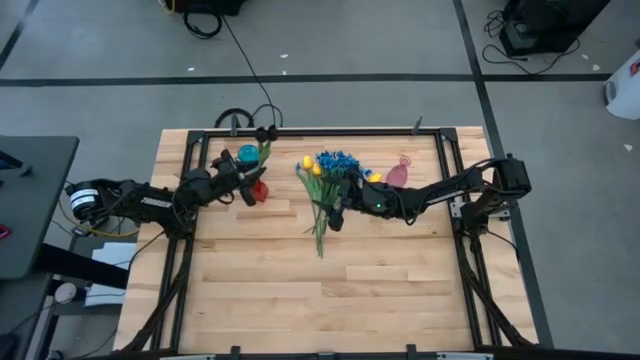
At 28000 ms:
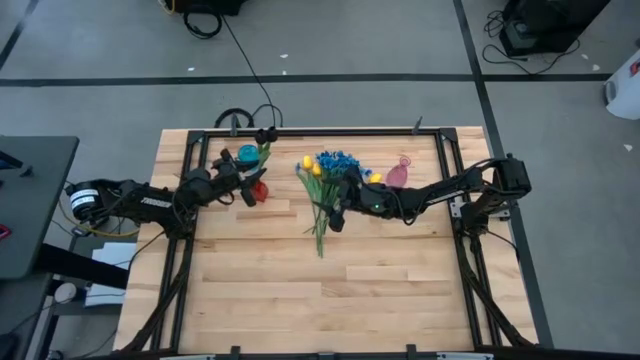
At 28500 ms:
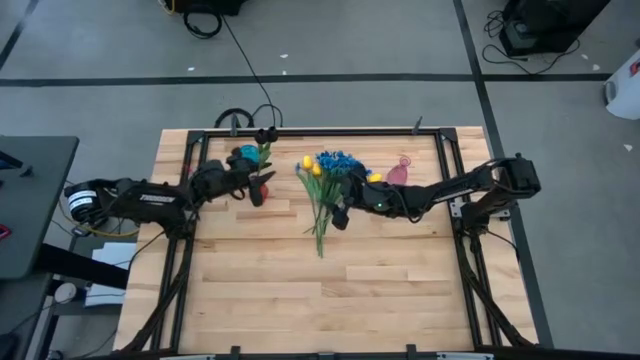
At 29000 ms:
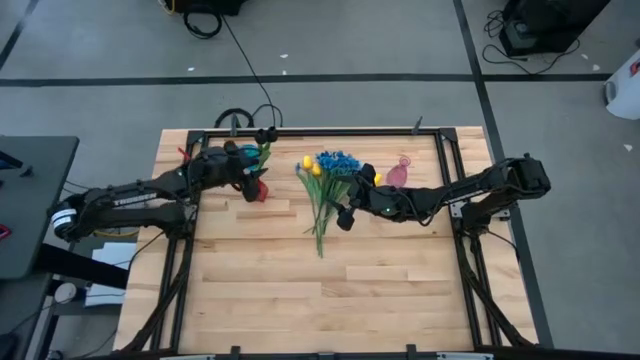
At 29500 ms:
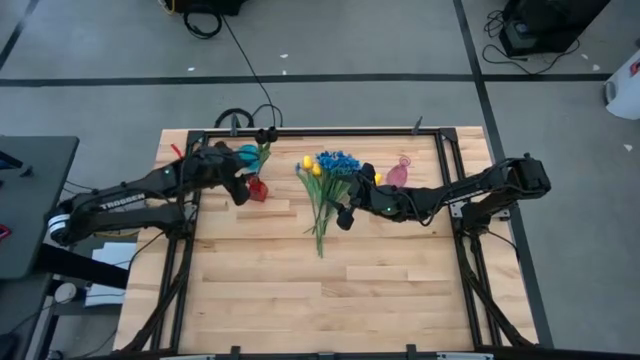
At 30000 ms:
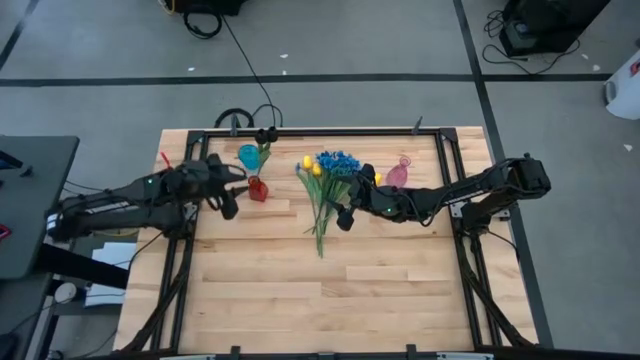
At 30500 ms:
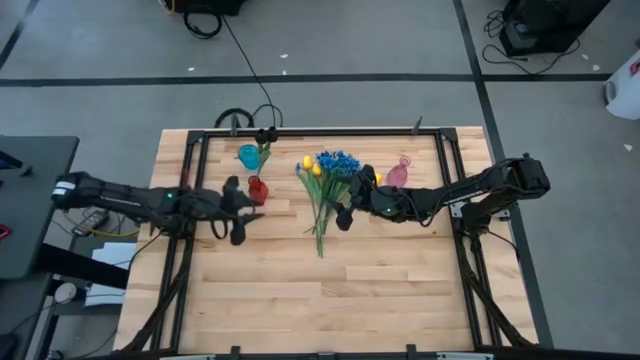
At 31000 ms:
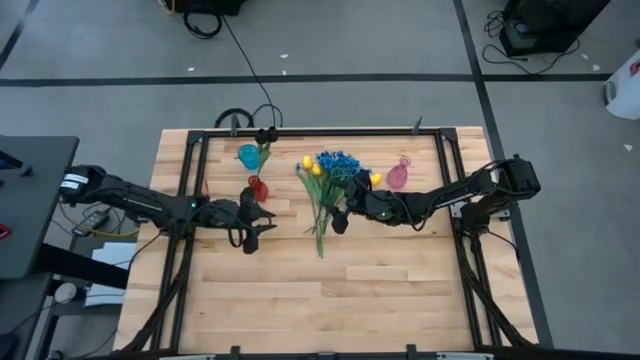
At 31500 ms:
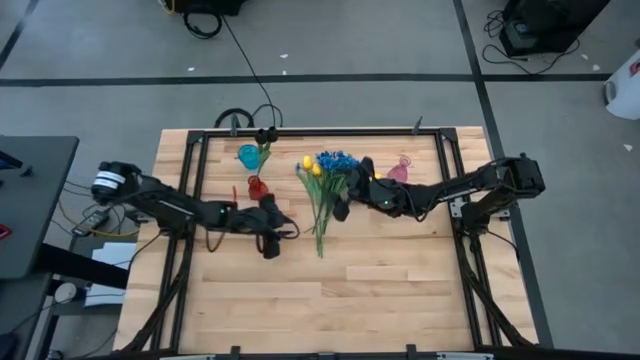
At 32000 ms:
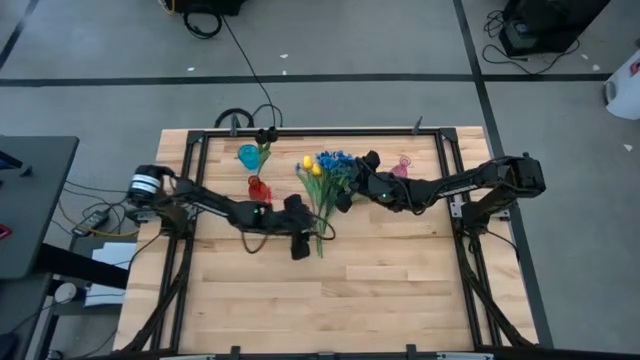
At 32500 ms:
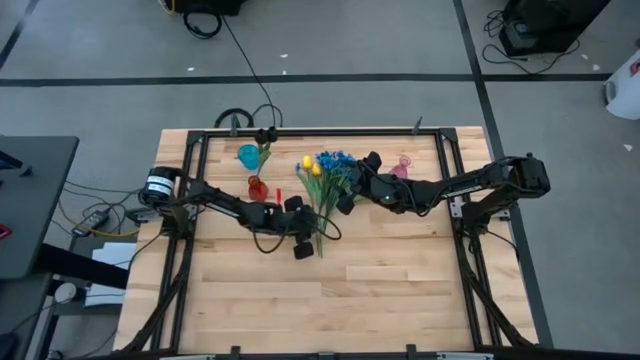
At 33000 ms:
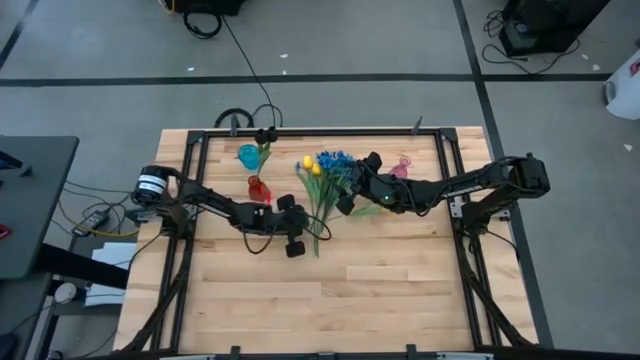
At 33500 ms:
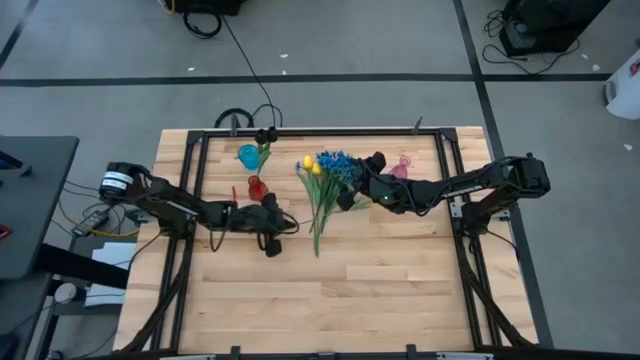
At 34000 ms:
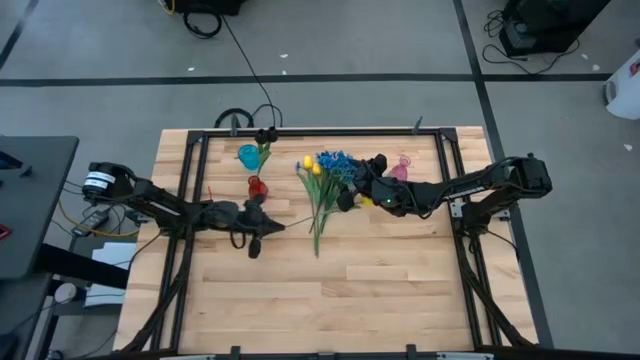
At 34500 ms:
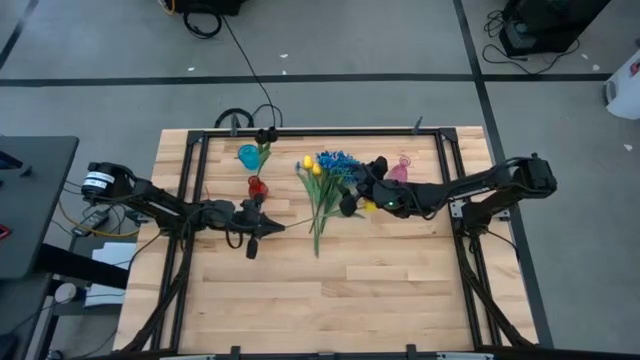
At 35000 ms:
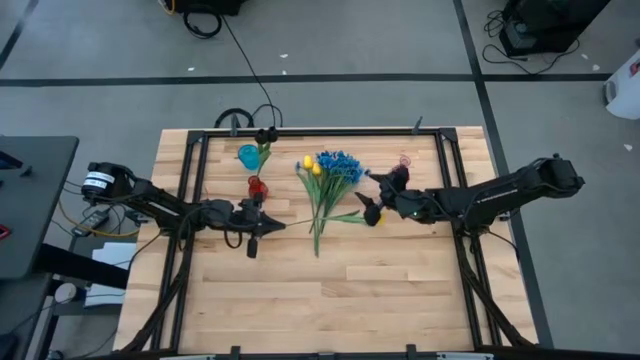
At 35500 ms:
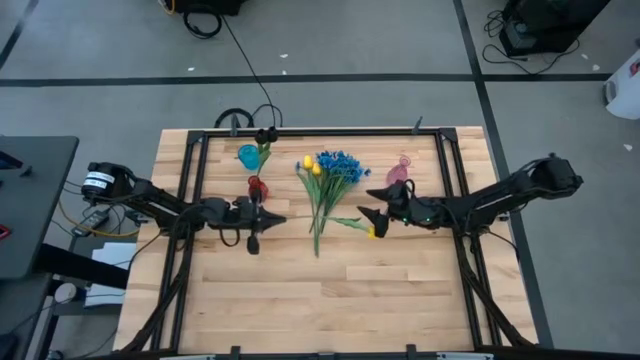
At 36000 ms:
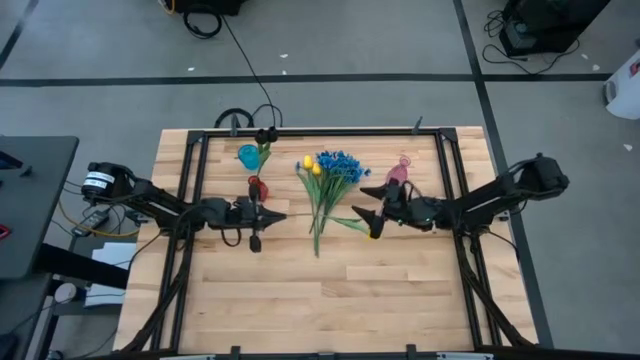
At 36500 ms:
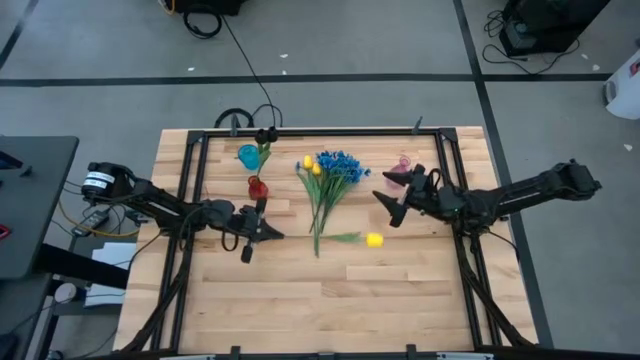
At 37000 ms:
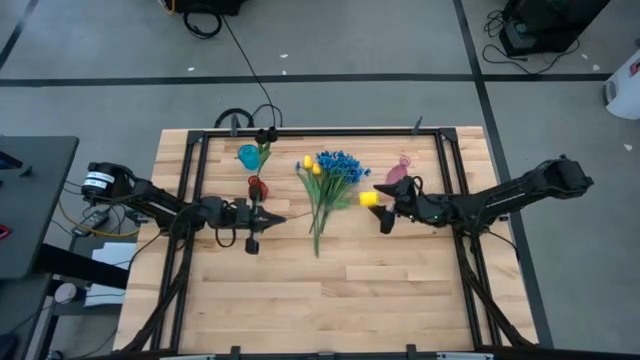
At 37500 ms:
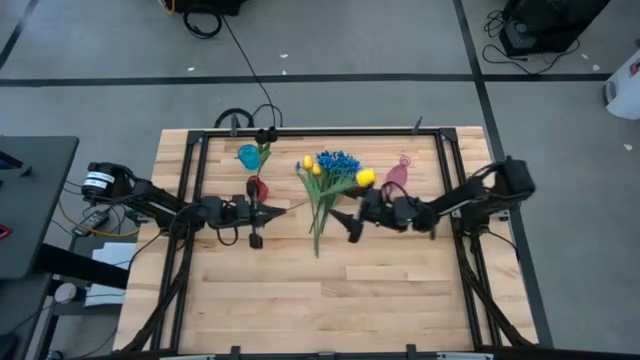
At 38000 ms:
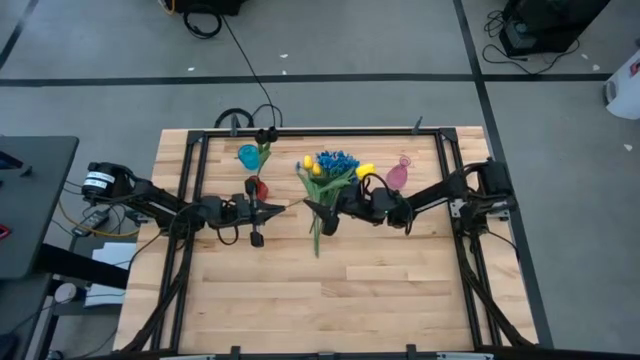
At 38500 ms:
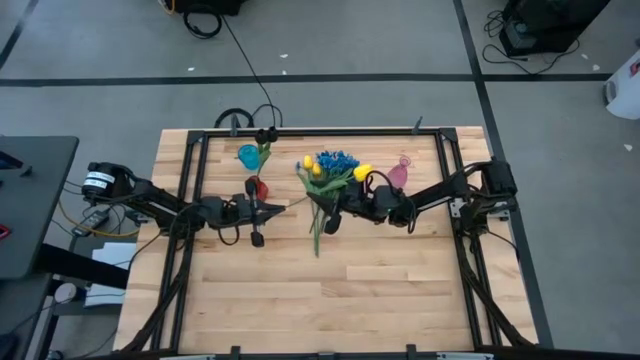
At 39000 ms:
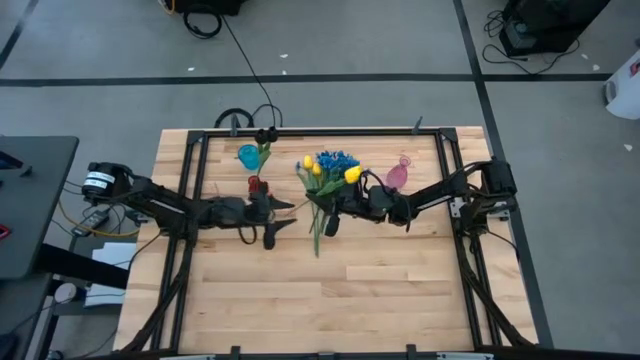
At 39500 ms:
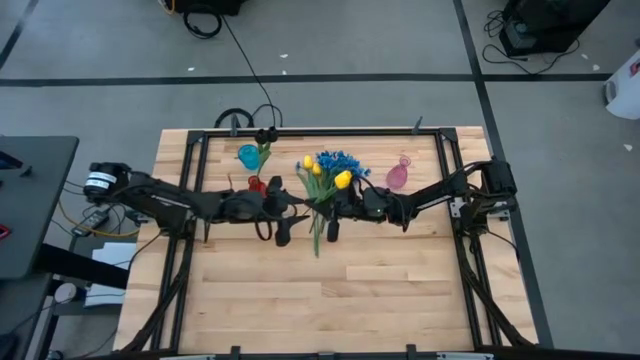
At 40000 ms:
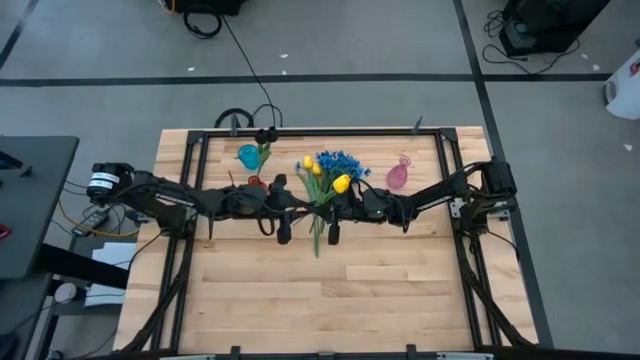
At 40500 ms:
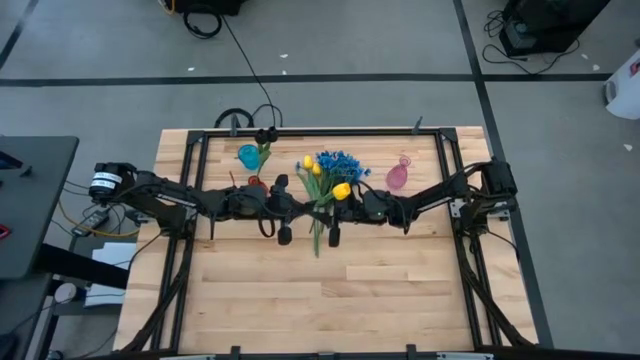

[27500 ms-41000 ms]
Task: Sort flowers into vase by color
Put the yellow flower into the pink vase

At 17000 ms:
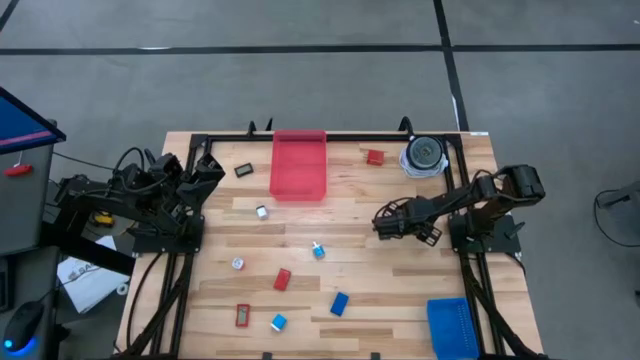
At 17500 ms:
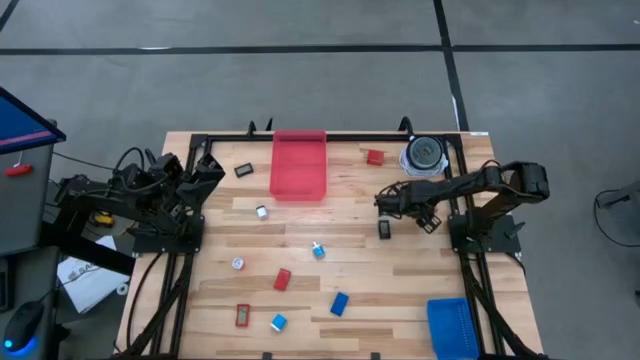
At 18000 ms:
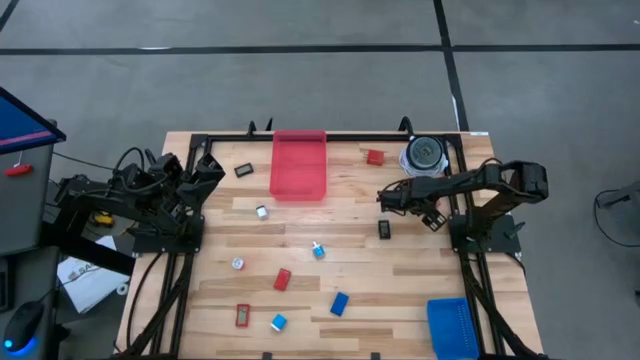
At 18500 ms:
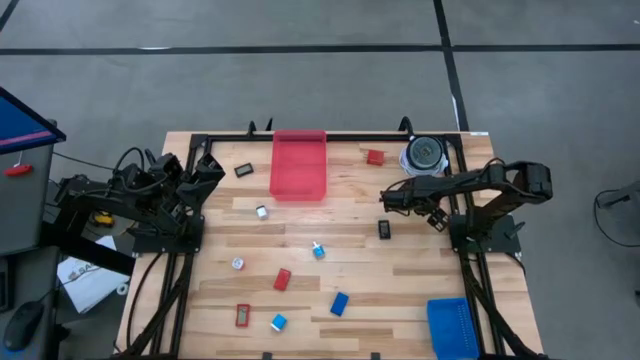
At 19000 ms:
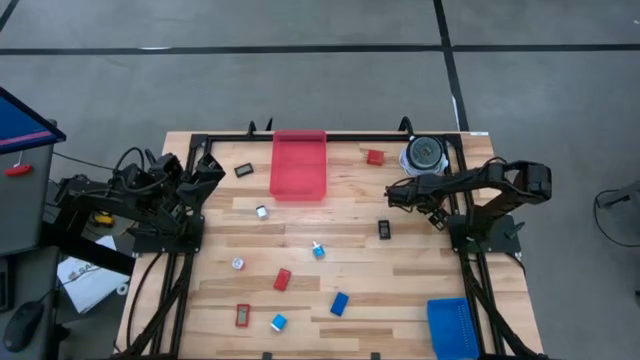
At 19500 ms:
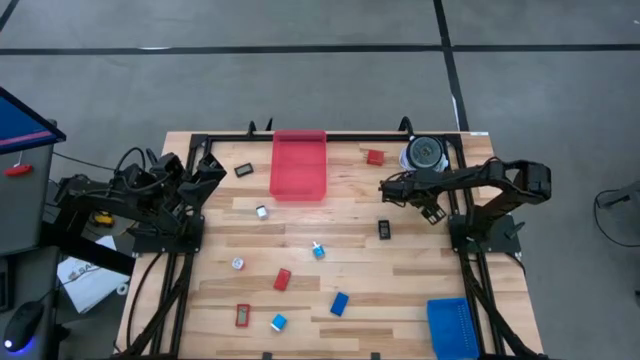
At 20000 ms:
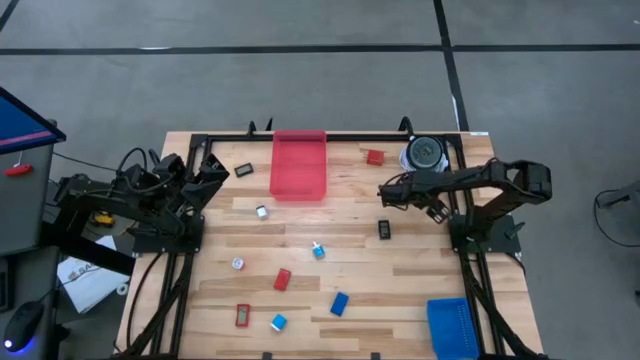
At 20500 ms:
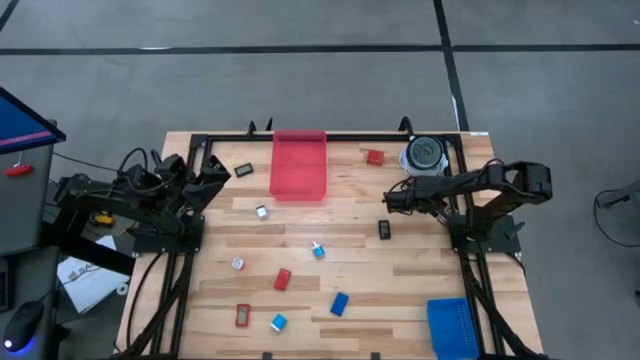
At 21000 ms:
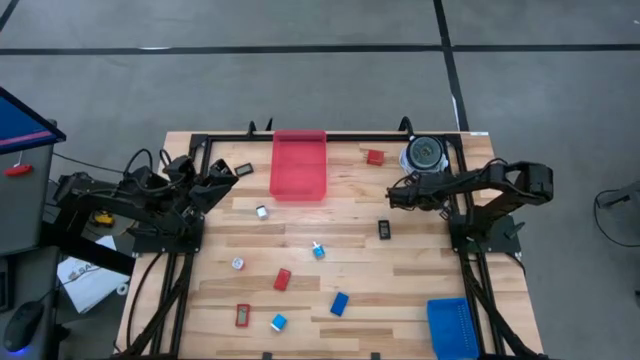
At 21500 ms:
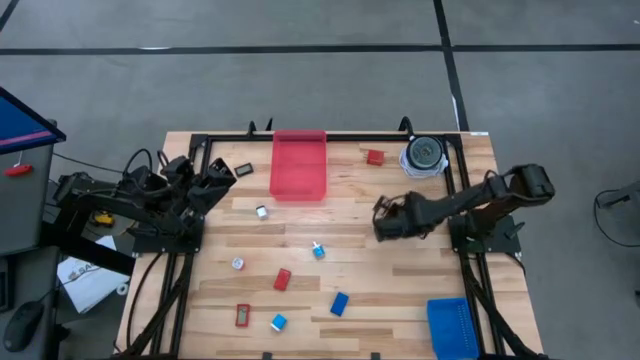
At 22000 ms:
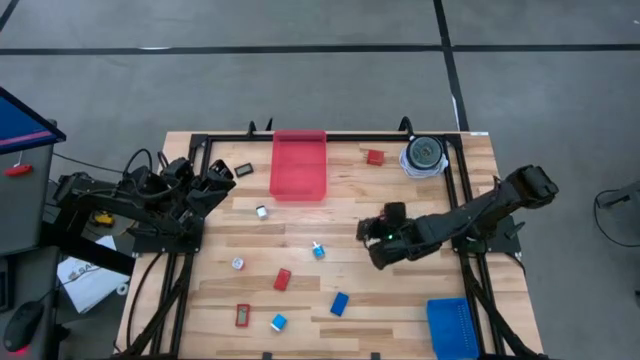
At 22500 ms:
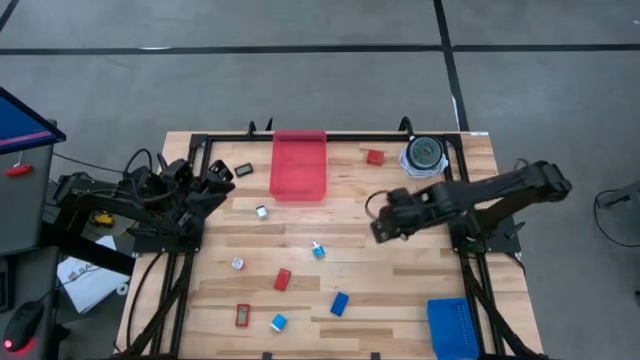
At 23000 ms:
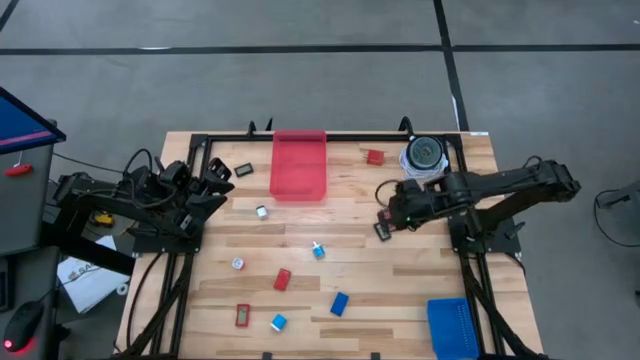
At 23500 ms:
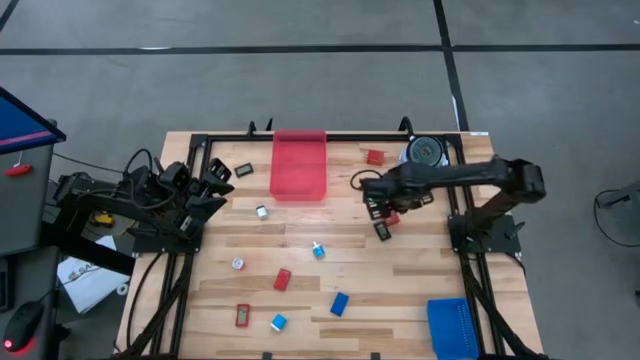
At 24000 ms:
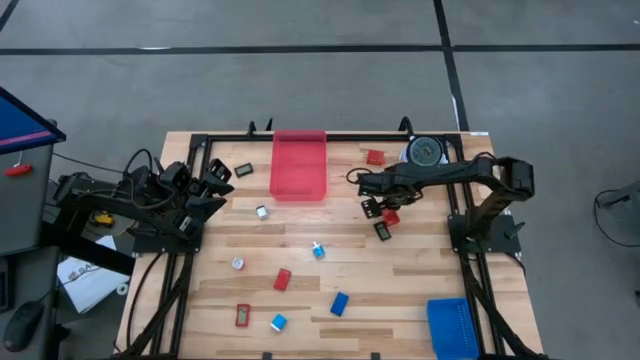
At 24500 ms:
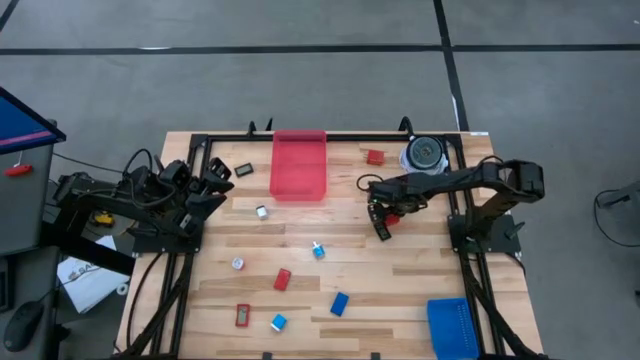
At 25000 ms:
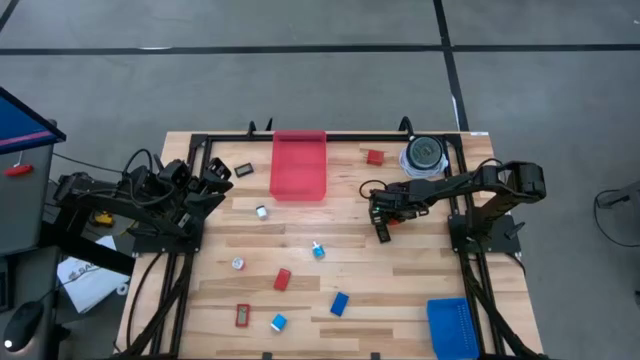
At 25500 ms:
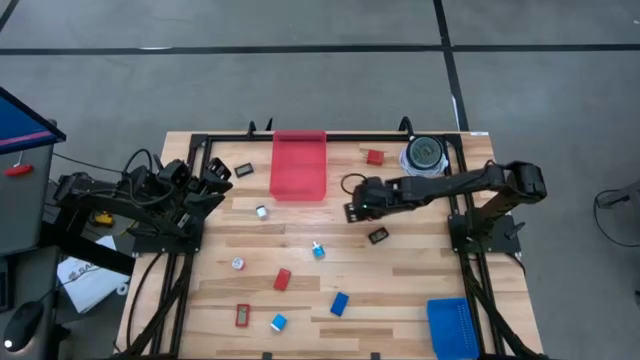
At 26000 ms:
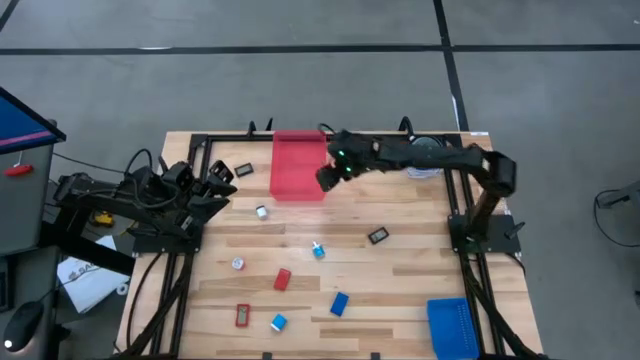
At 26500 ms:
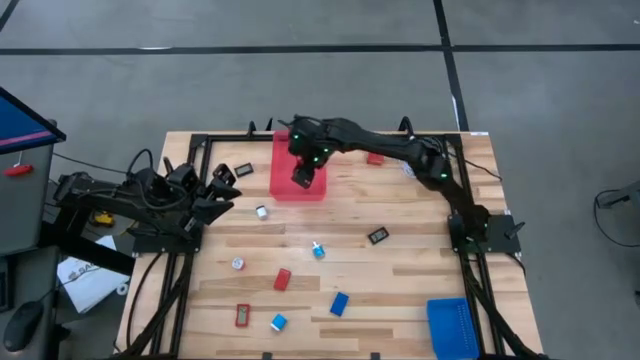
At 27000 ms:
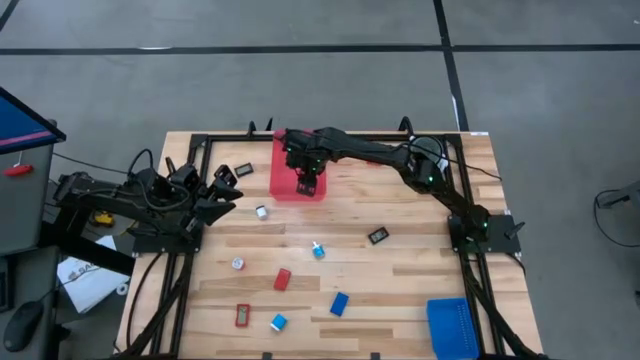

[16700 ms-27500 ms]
Task: Pick & Place Office items
Put the bottom red charger adapter into the red bin
